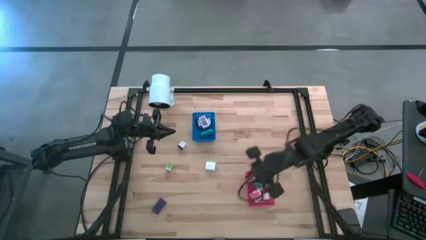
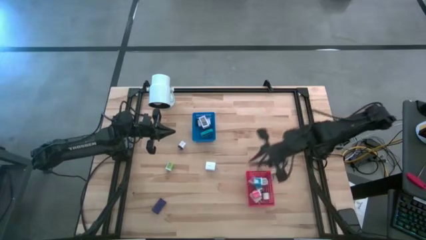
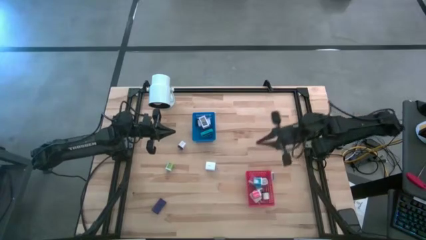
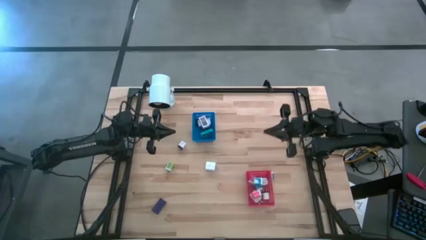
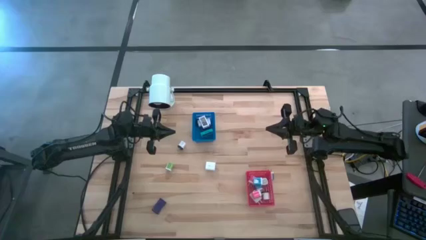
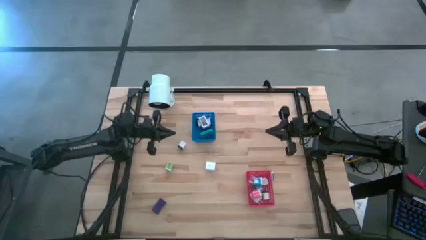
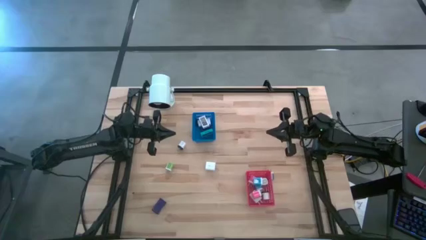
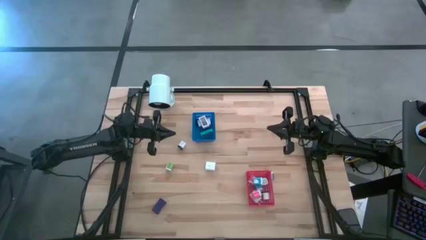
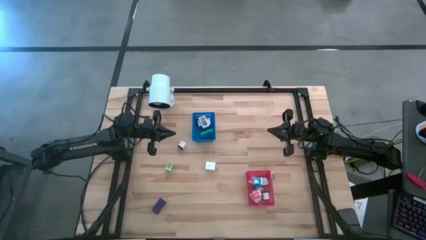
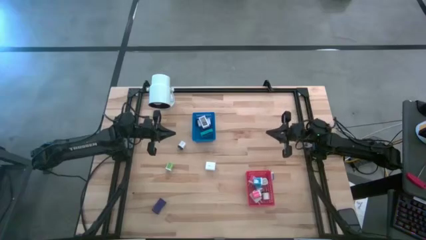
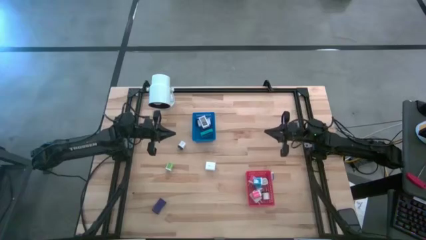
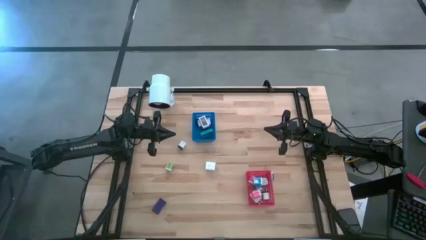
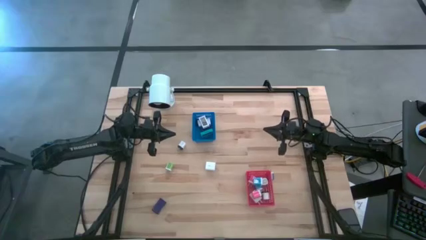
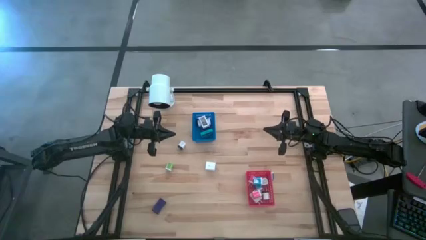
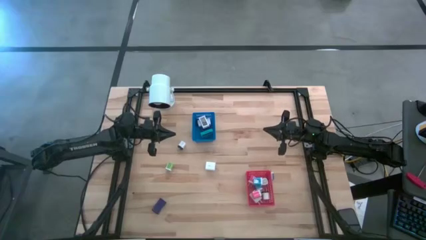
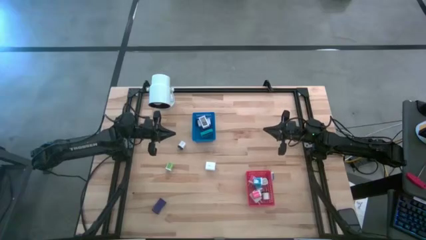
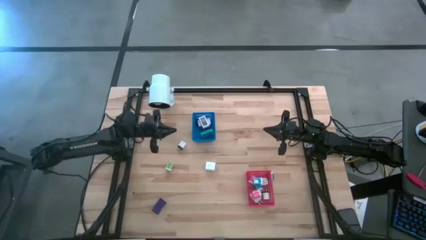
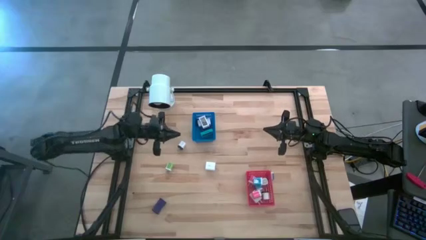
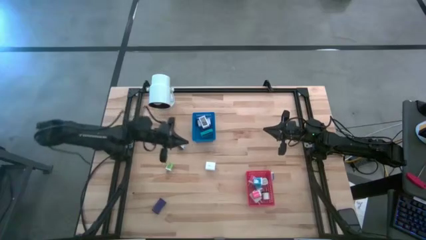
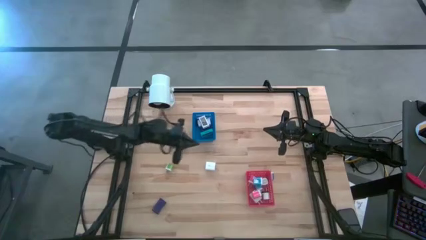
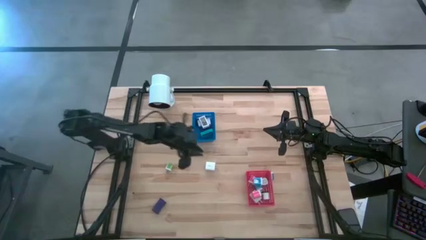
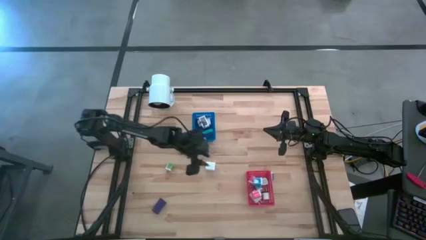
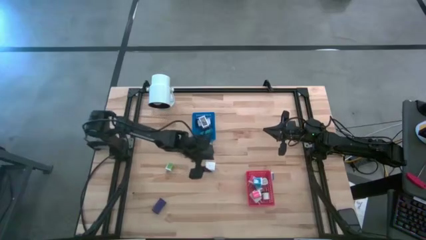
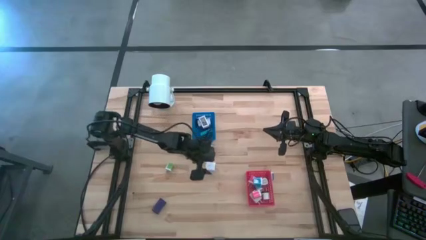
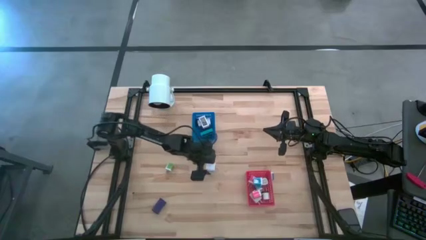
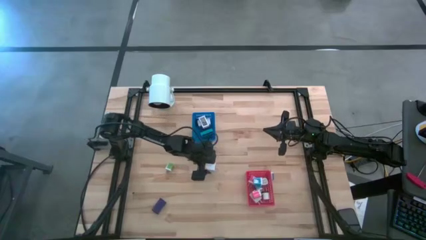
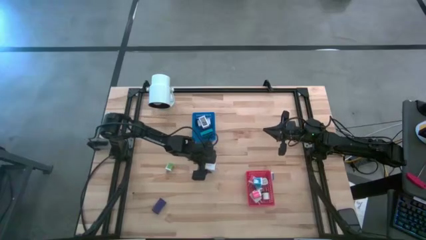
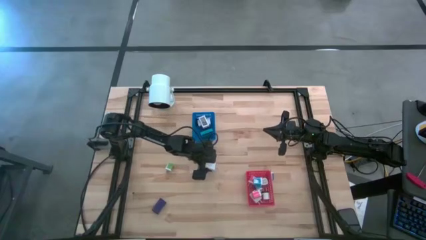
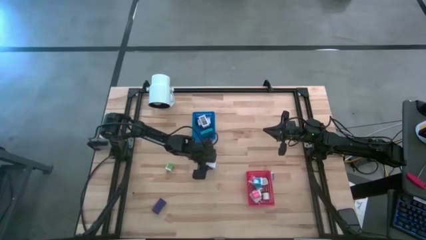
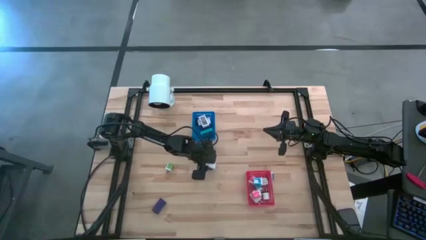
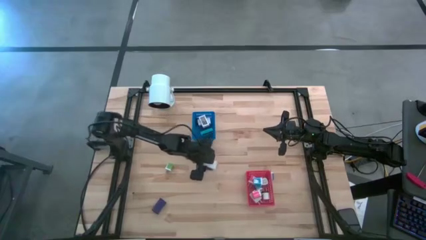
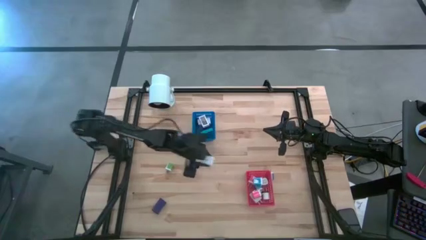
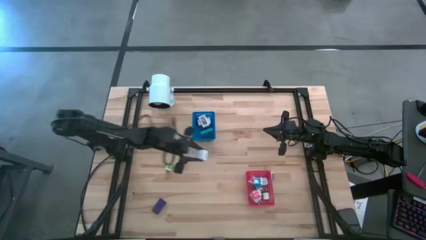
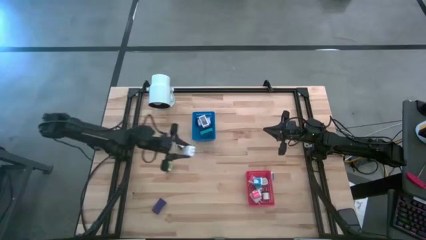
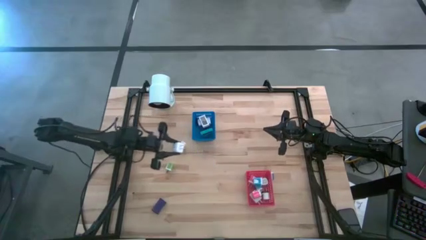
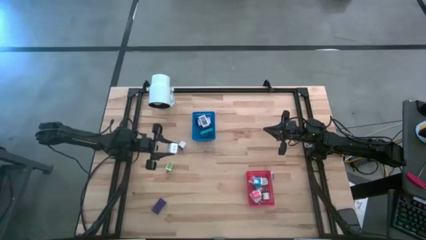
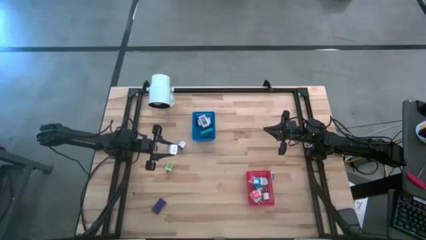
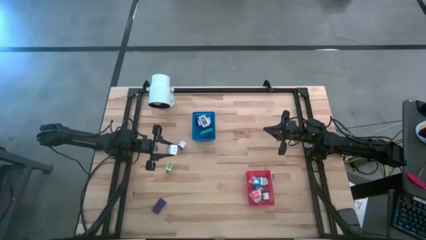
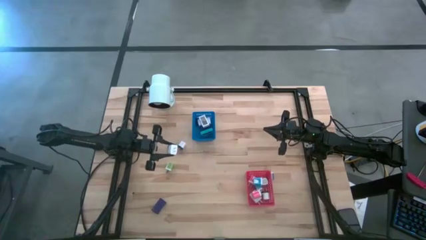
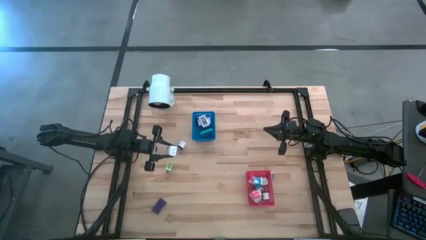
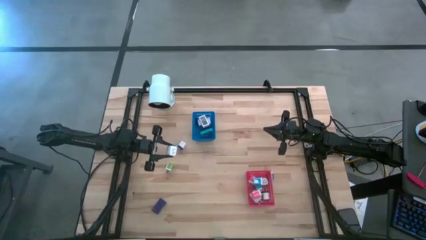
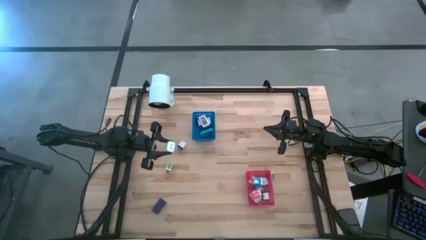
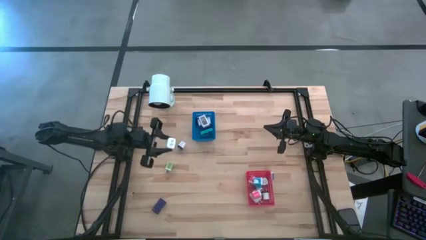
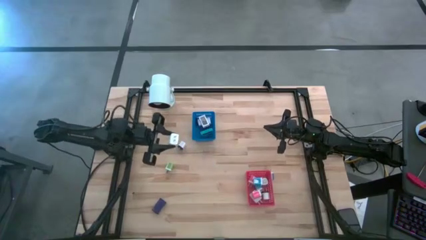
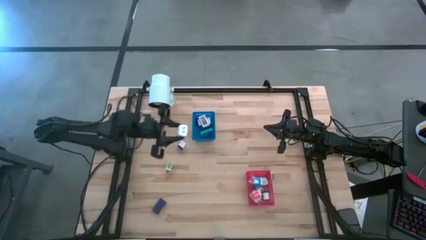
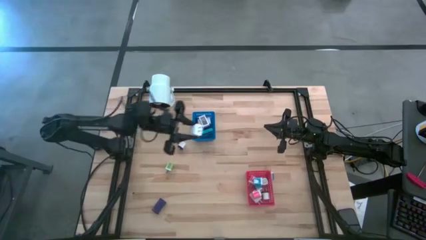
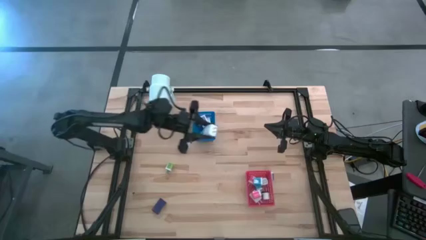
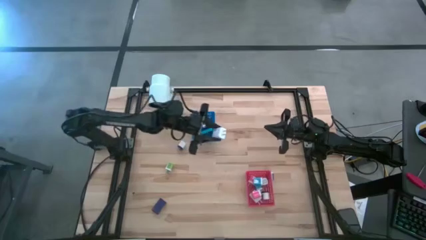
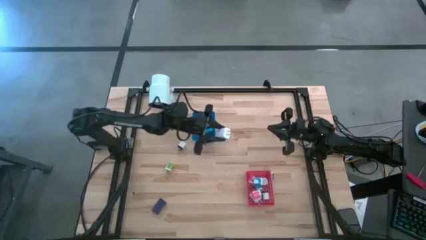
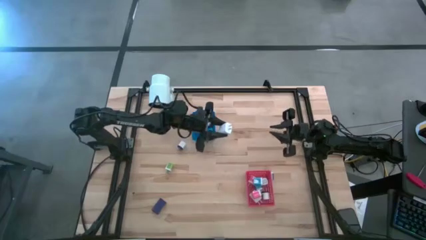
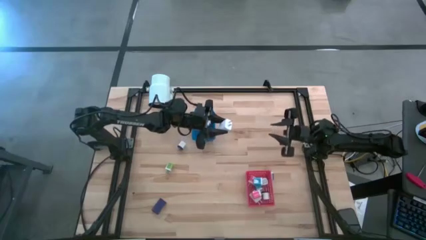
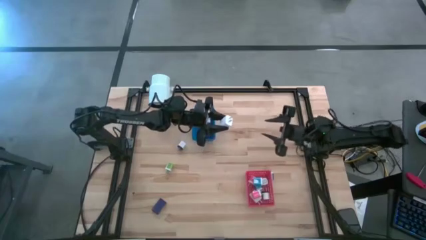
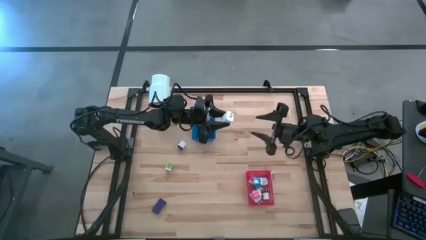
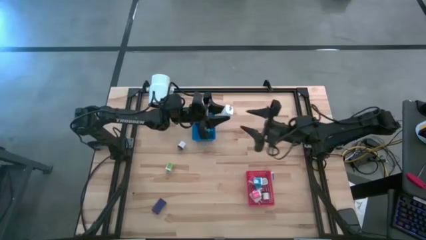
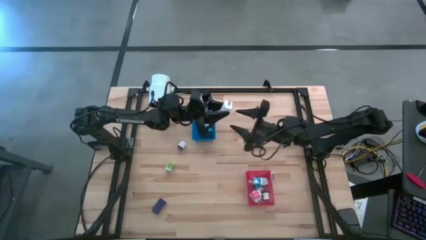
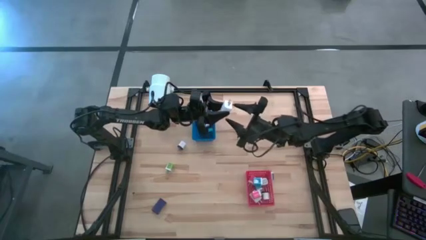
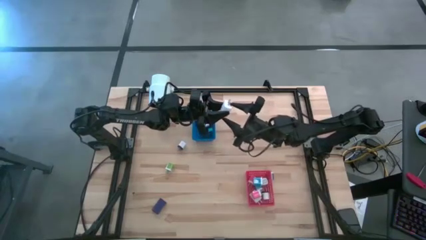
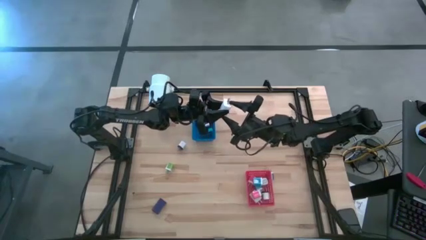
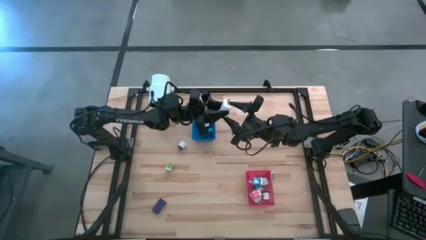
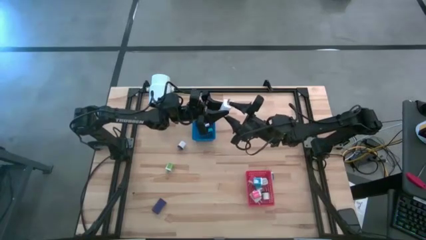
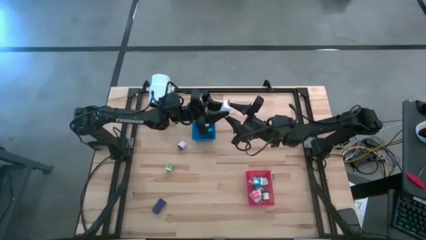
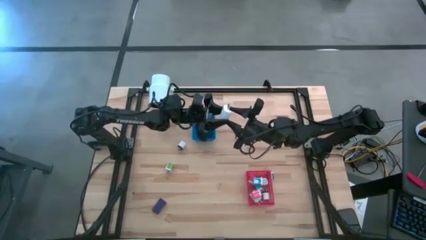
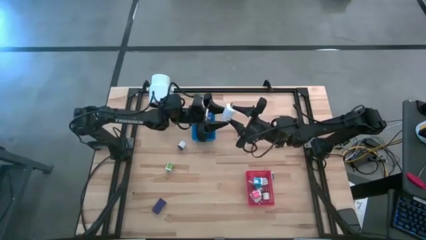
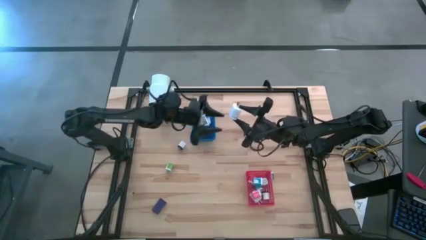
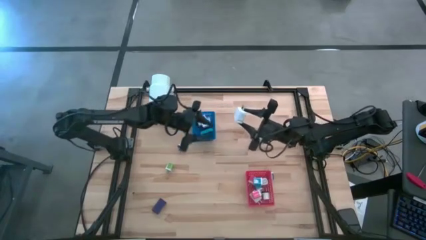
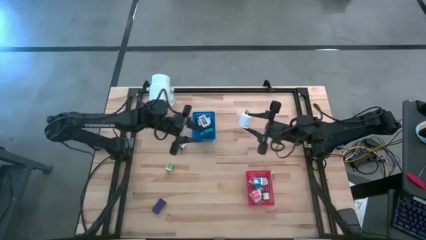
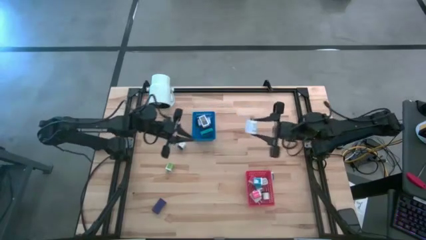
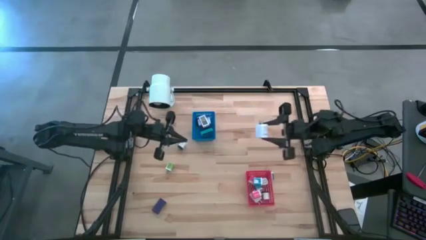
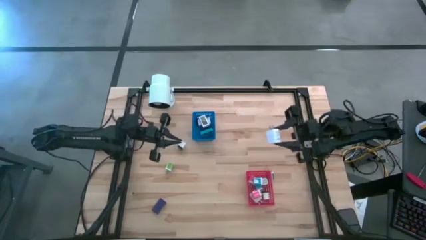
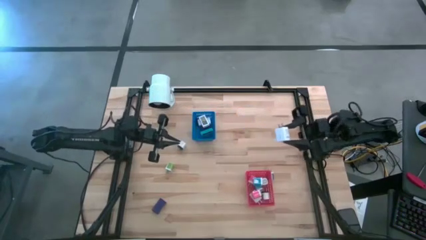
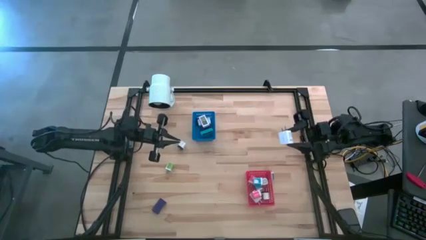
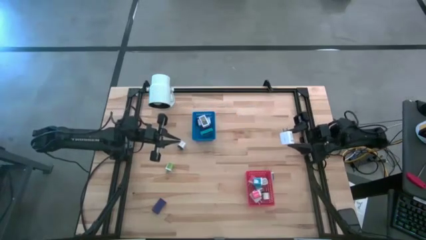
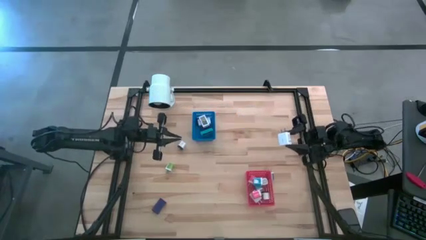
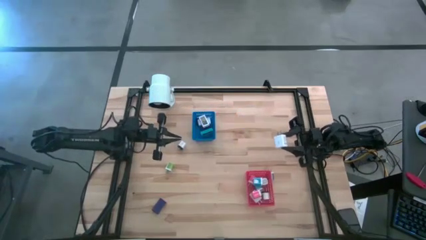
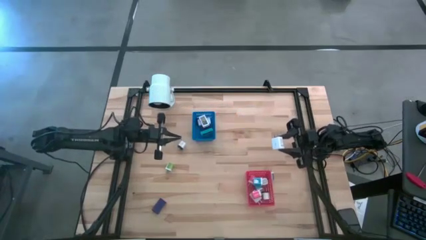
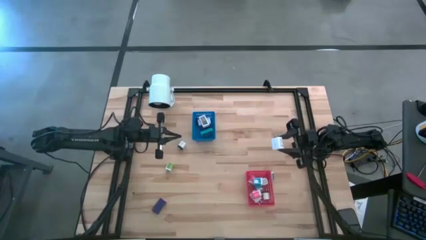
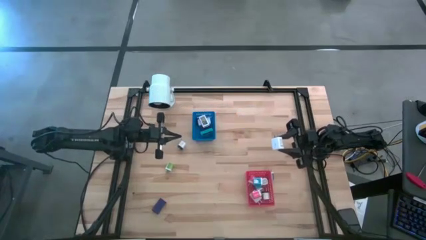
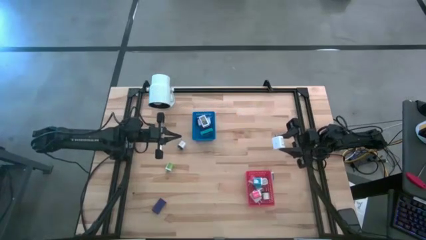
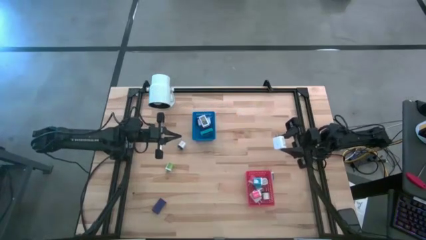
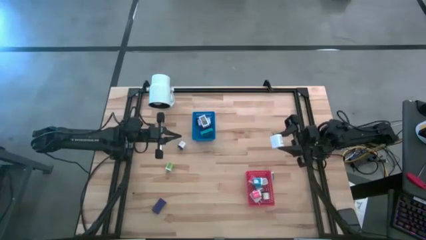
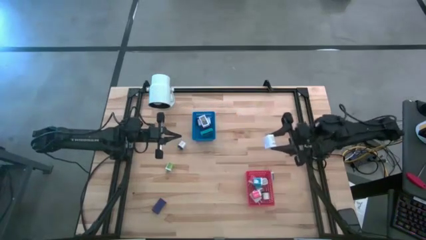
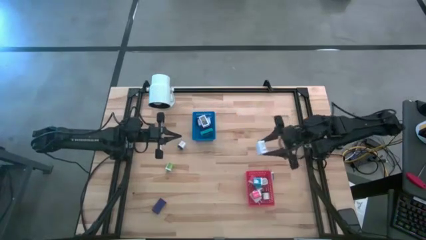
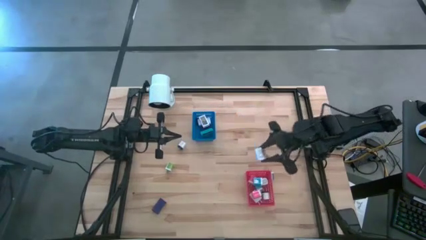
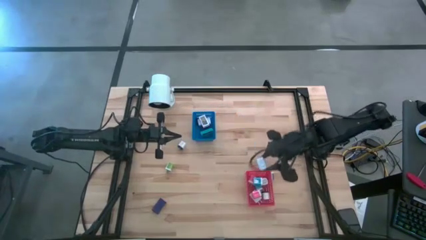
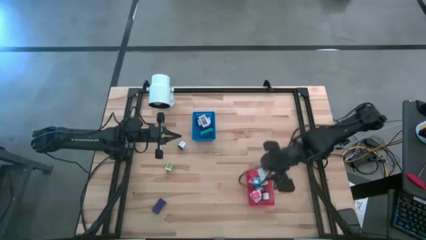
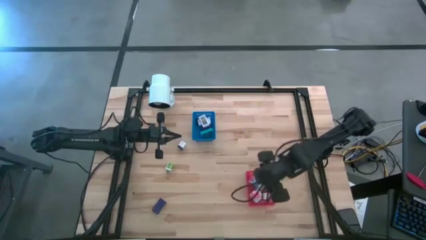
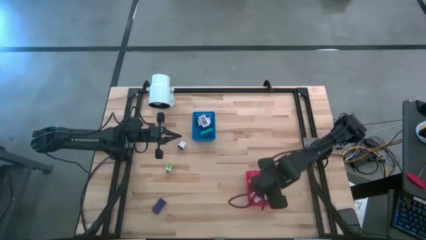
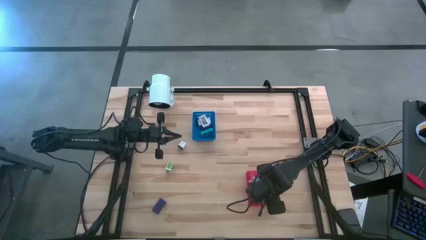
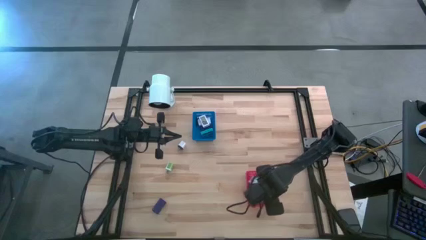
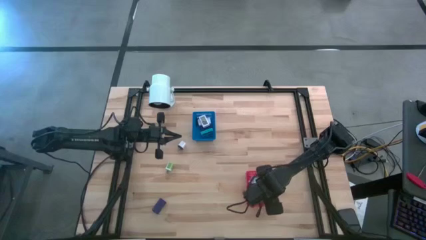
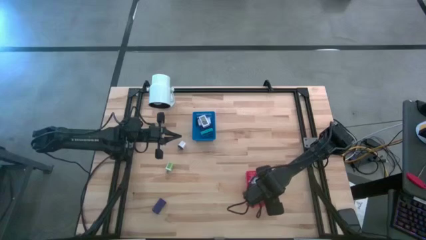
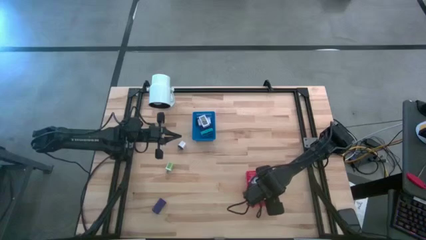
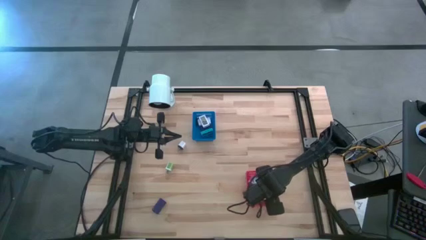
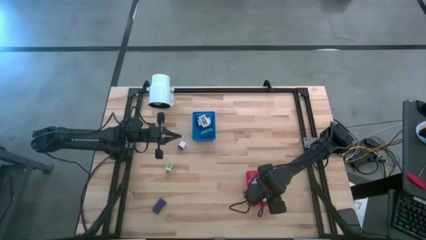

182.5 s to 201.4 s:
Task: Pick & Place Office items
Put the white charger adapter into the red bin
